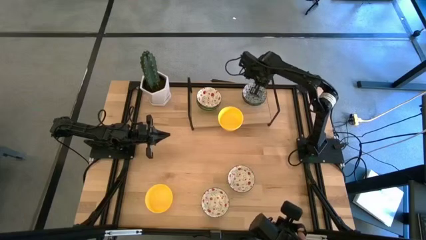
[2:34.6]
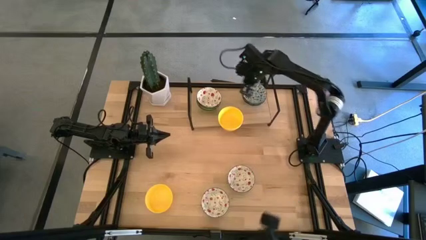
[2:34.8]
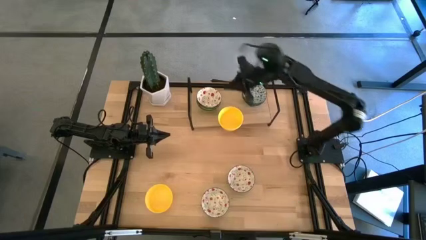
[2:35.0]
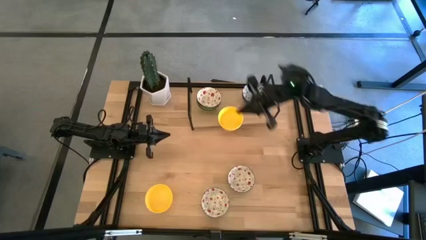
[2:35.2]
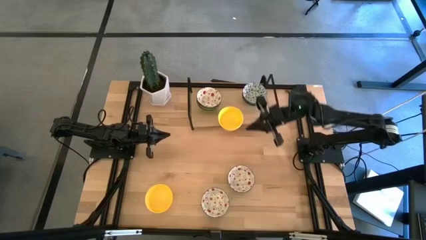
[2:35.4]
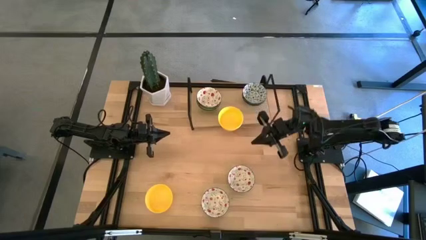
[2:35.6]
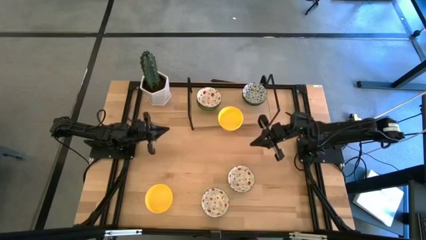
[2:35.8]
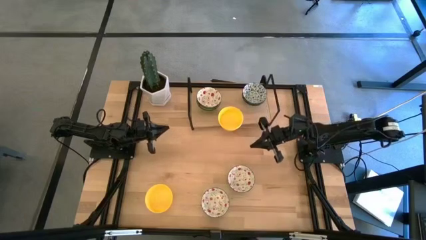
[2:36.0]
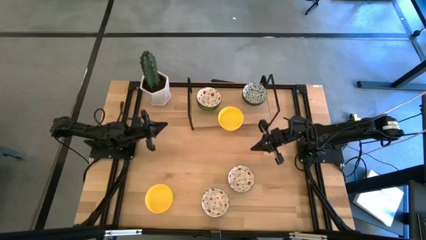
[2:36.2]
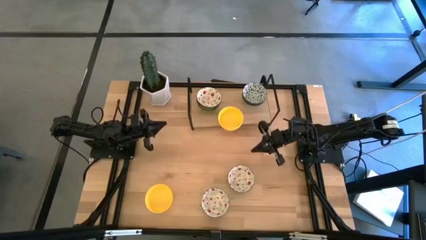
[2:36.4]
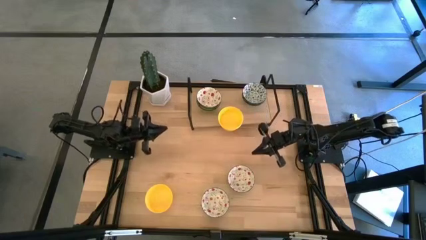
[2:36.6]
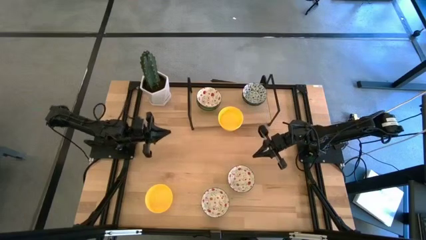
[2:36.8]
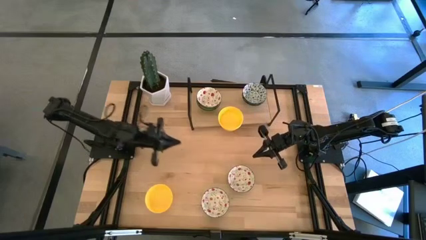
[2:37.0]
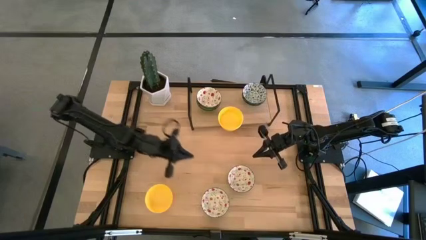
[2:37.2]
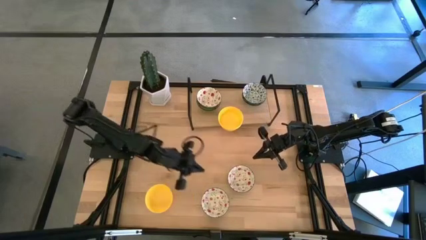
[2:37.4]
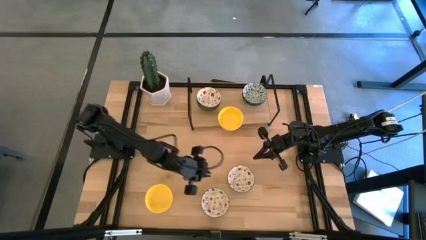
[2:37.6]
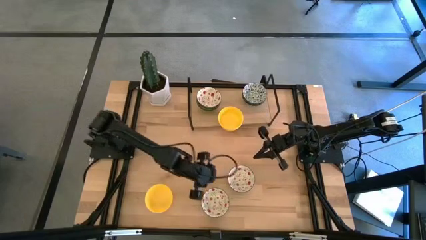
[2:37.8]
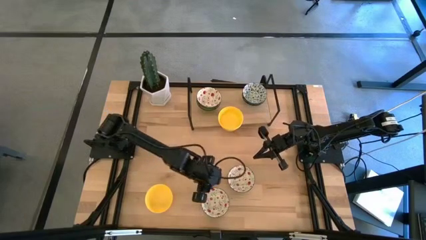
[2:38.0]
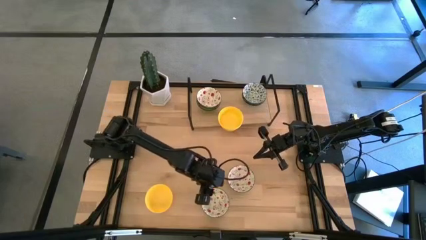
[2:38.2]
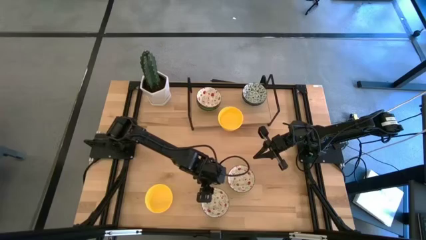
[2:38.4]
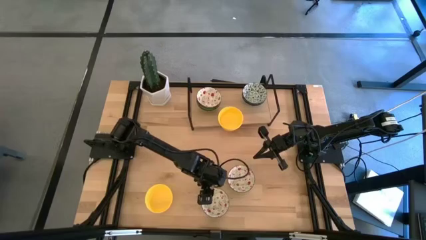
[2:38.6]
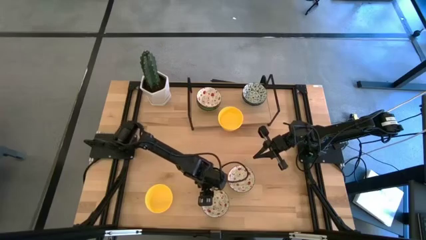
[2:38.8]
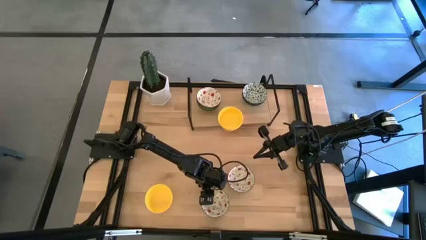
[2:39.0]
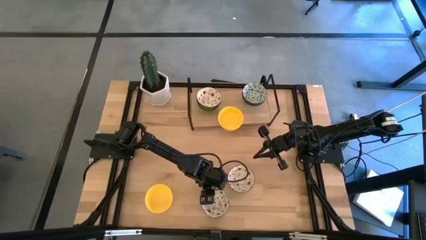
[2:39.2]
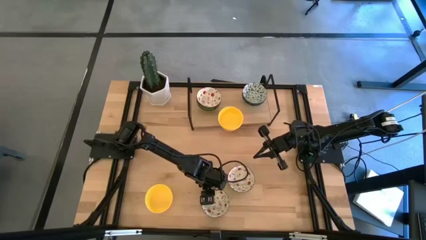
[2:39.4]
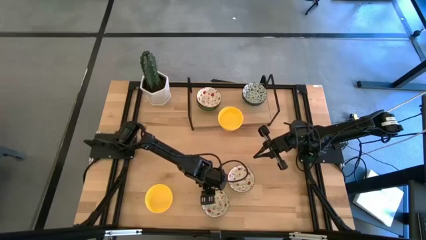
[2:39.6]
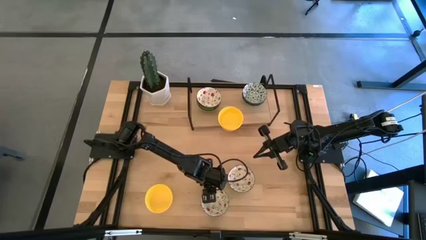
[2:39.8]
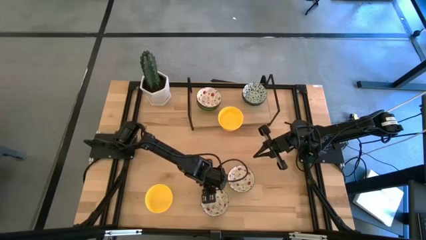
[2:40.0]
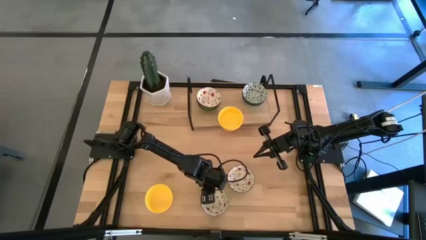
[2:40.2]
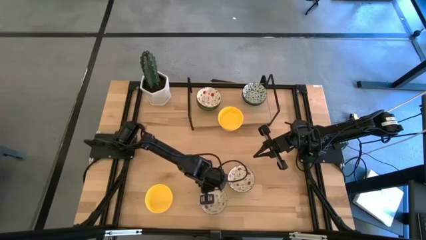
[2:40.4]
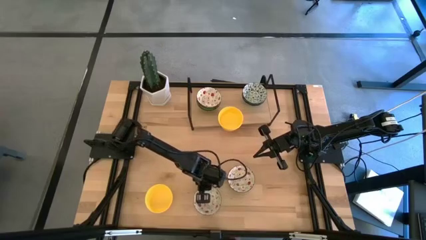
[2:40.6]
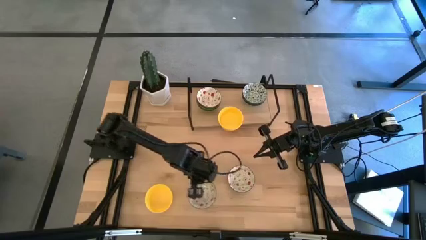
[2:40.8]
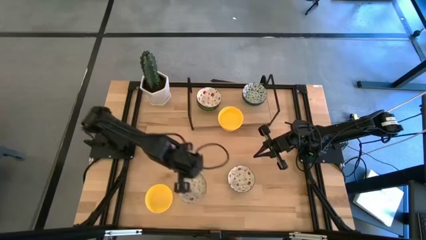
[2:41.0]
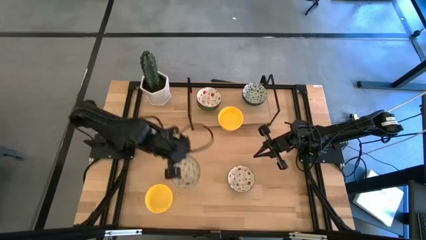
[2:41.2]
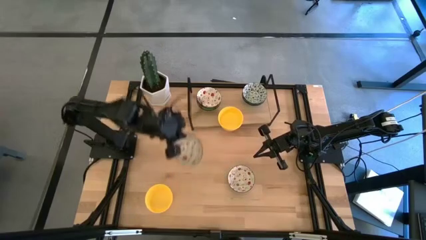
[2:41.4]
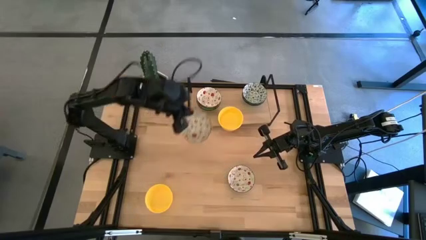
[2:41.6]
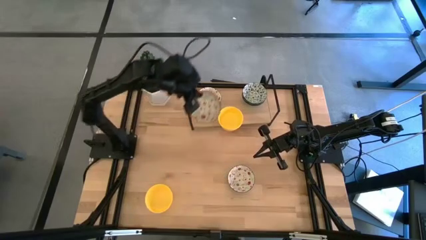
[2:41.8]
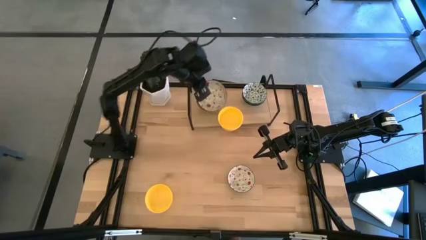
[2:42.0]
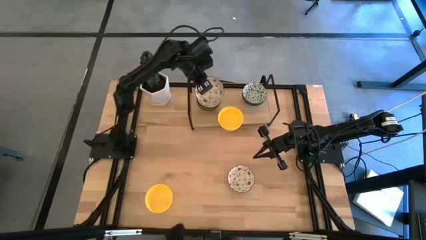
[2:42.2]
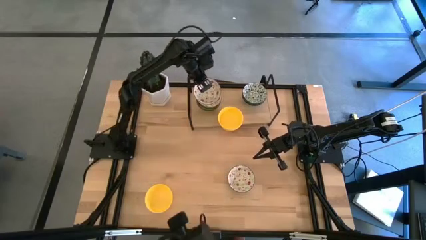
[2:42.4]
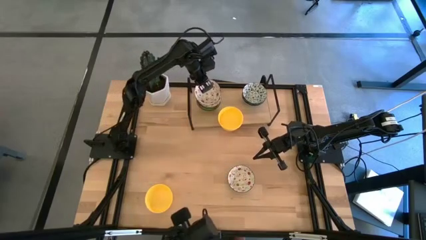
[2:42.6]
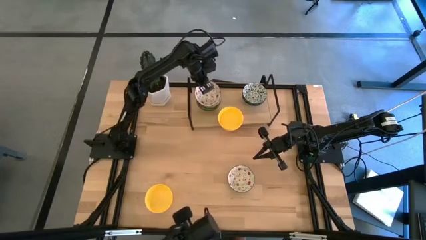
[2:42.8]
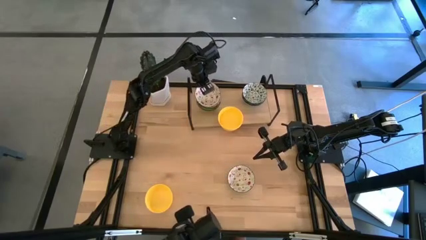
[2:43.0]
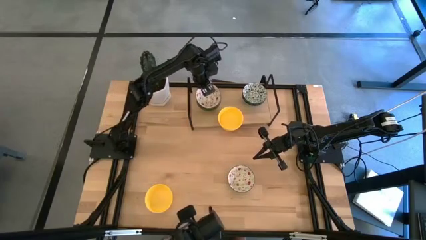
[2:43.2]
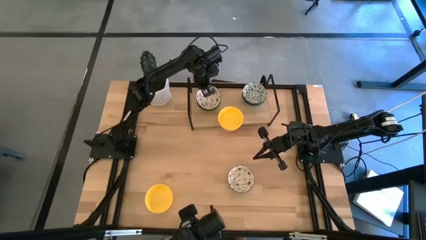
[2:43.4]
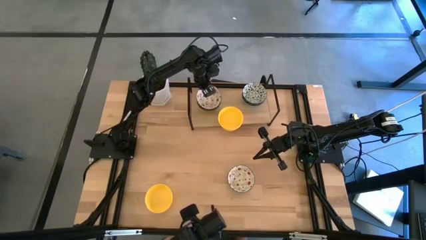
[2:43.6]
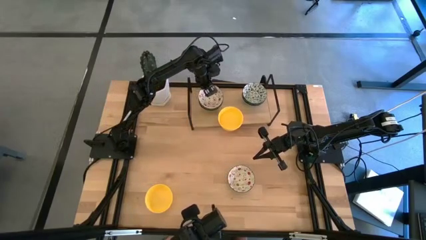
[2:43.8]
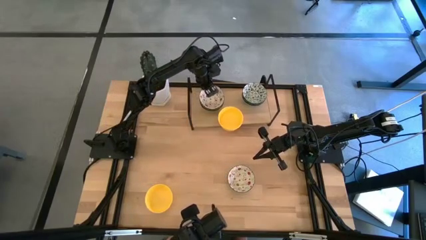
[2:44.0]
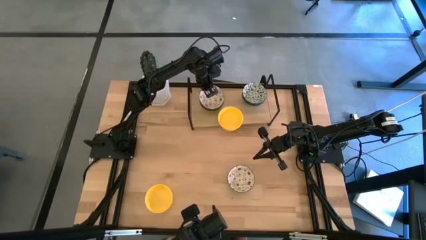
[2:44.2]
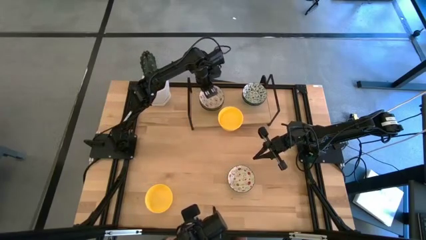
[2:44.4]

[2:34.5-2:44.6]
Task: Pick & Place Mini bowls
Stack the red patterned bowl on top of the red patterned bowl on the shelf
